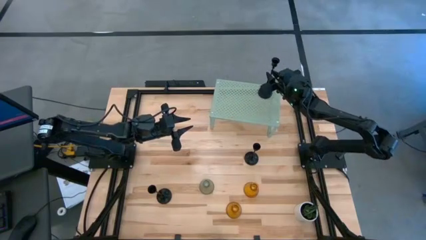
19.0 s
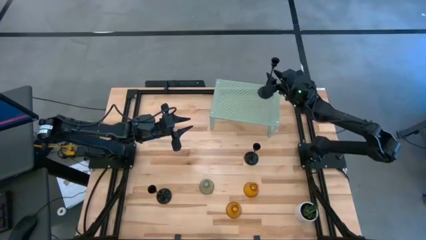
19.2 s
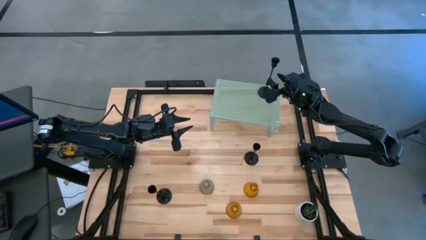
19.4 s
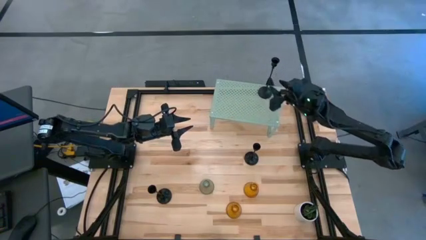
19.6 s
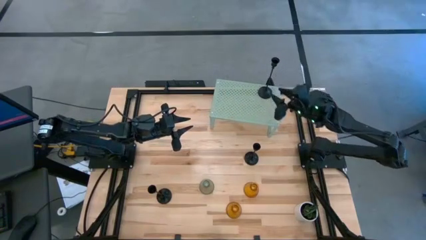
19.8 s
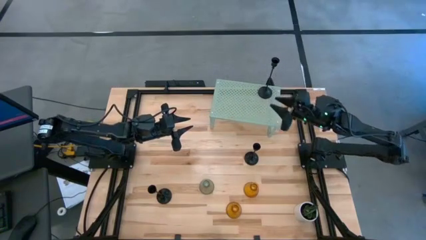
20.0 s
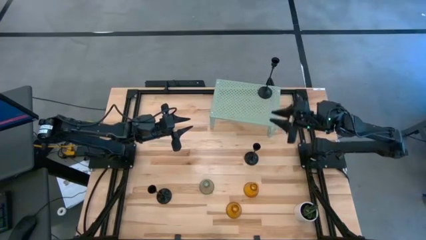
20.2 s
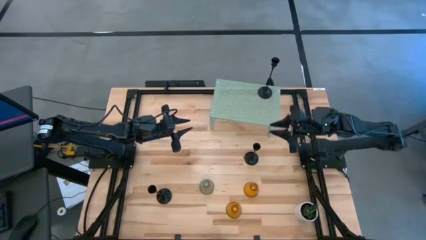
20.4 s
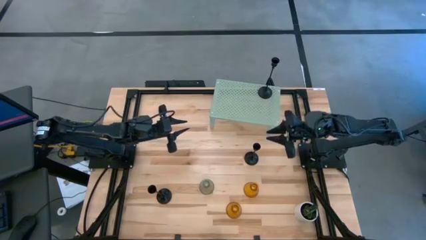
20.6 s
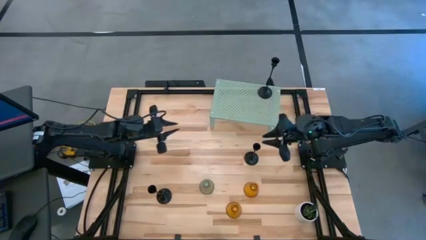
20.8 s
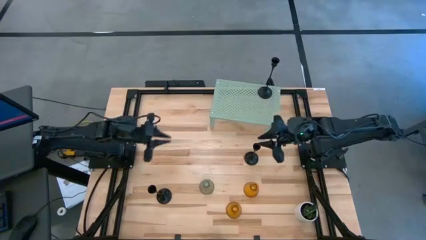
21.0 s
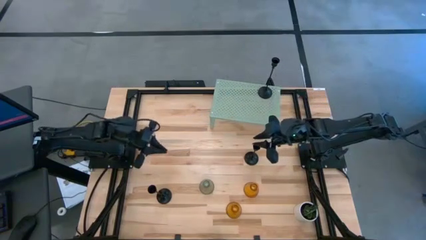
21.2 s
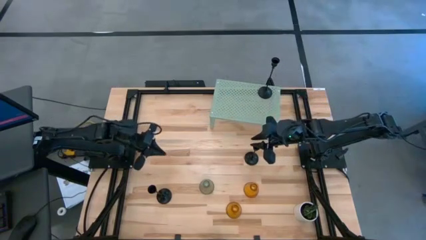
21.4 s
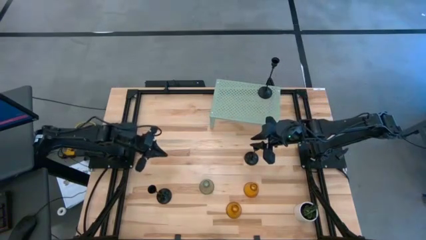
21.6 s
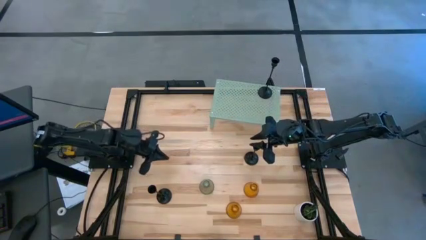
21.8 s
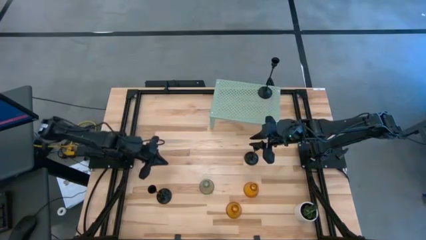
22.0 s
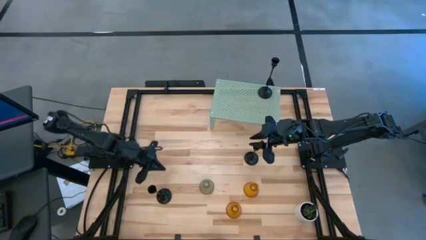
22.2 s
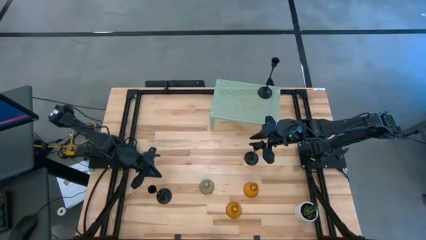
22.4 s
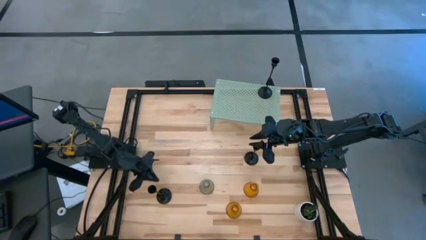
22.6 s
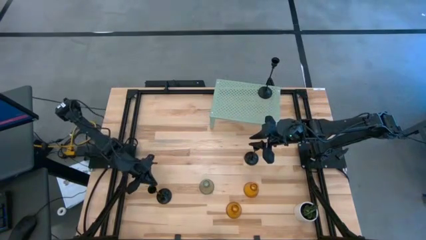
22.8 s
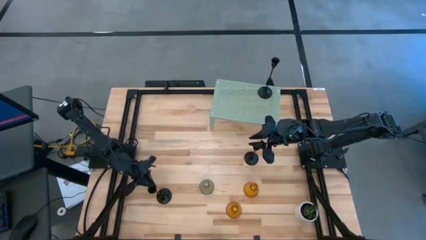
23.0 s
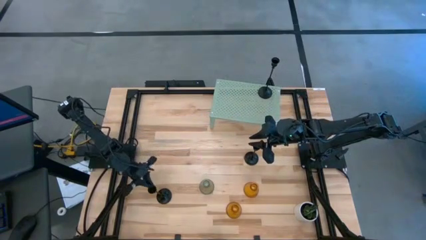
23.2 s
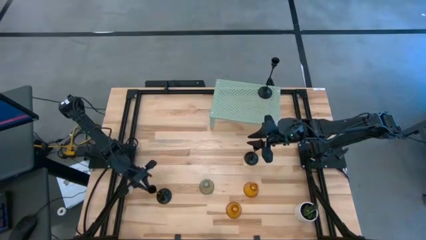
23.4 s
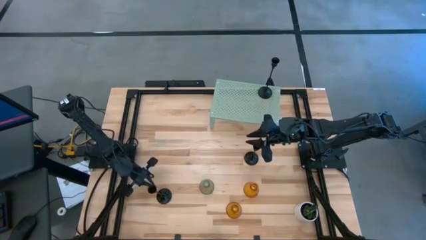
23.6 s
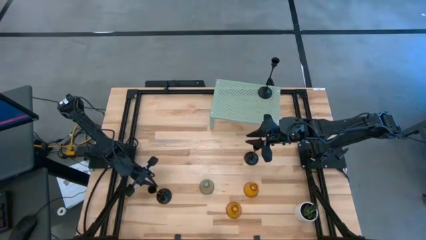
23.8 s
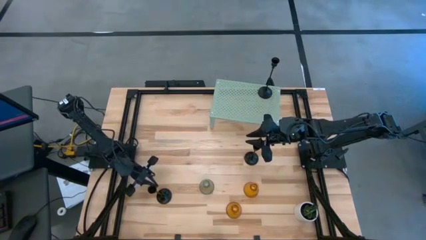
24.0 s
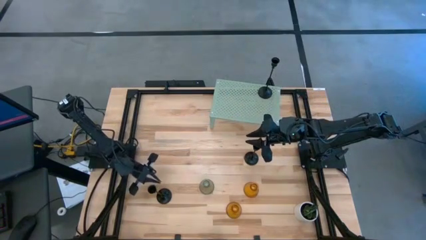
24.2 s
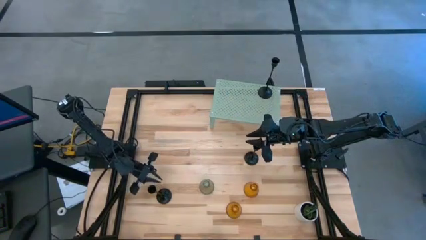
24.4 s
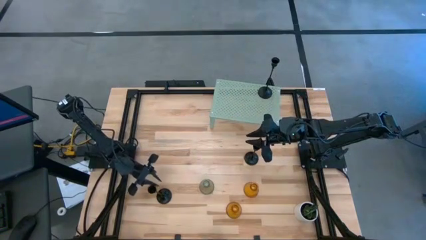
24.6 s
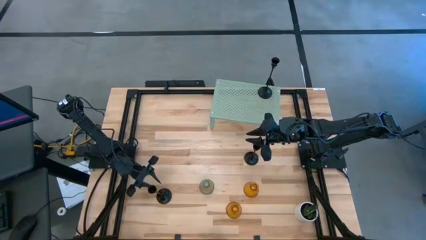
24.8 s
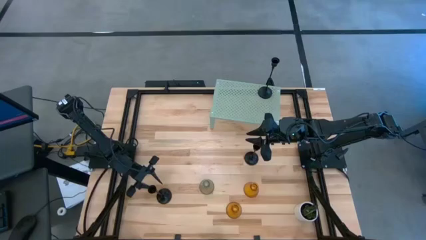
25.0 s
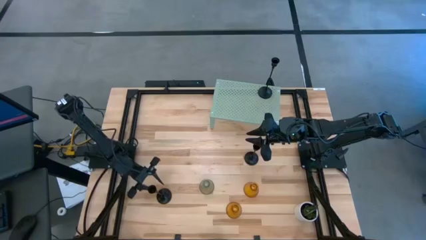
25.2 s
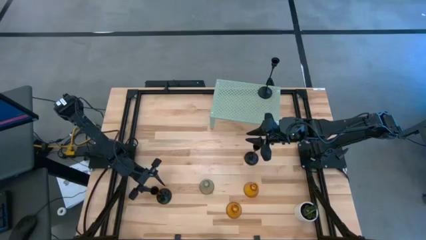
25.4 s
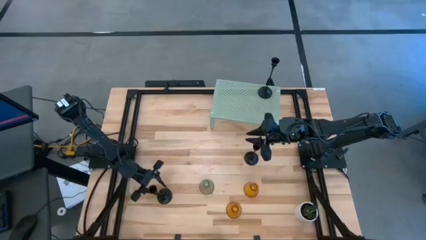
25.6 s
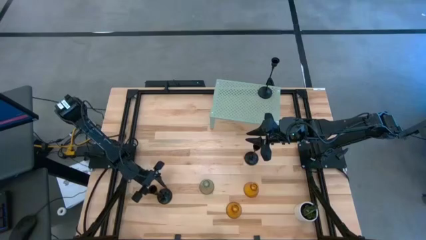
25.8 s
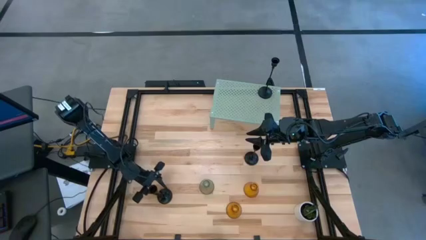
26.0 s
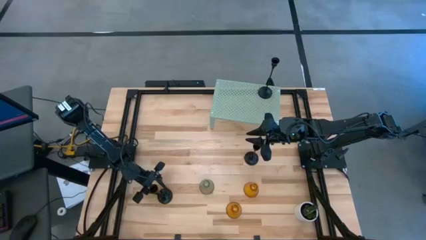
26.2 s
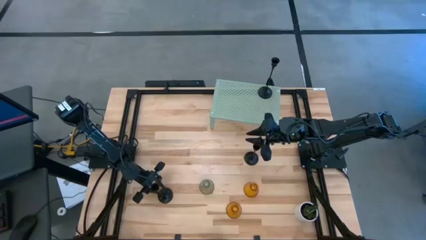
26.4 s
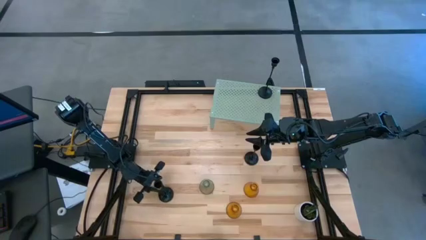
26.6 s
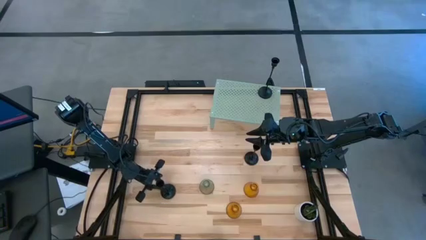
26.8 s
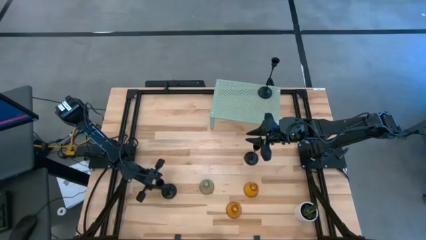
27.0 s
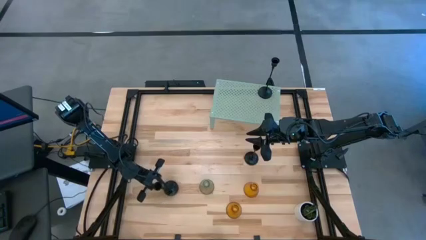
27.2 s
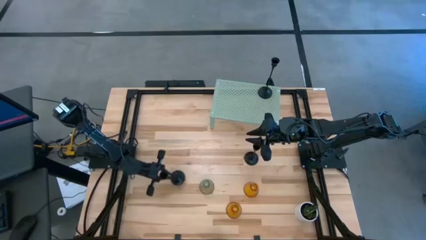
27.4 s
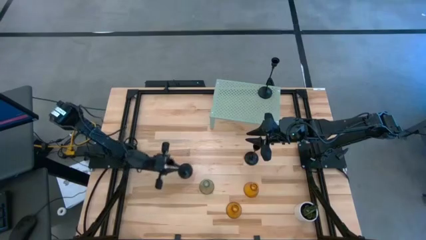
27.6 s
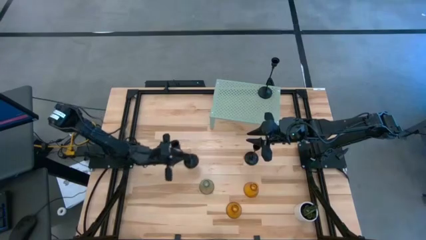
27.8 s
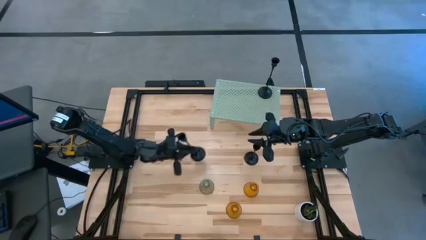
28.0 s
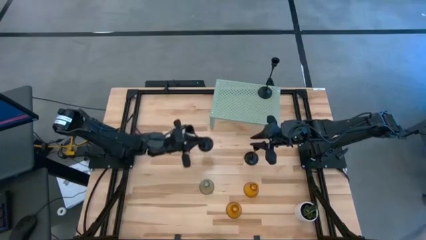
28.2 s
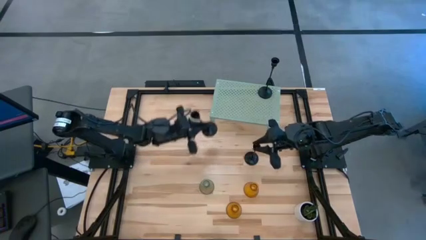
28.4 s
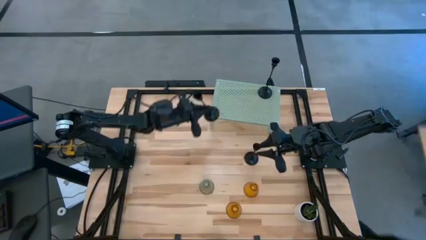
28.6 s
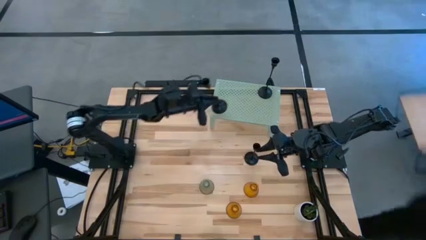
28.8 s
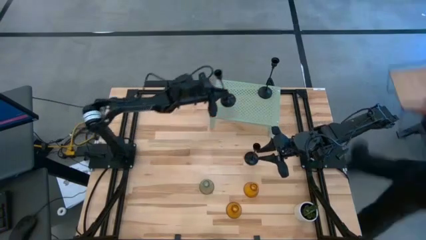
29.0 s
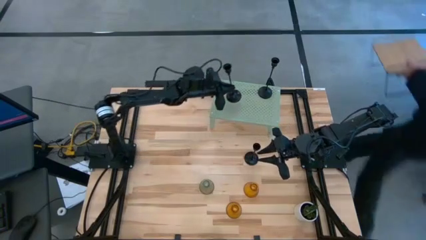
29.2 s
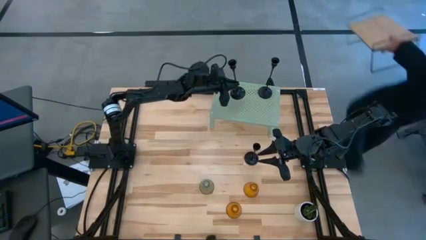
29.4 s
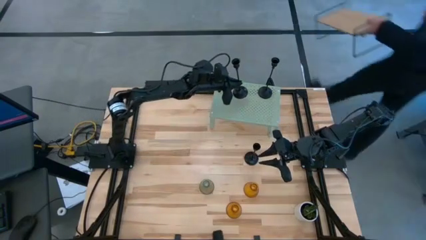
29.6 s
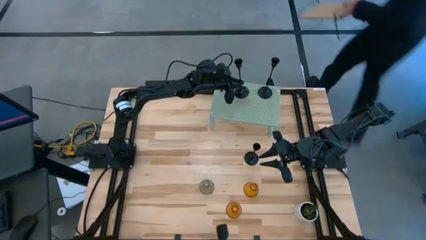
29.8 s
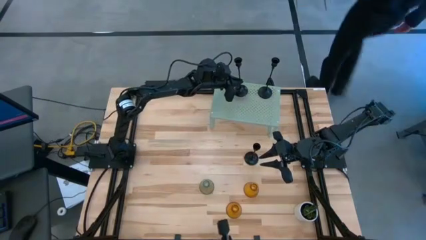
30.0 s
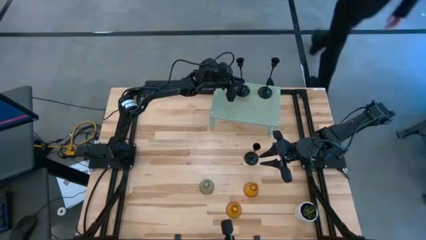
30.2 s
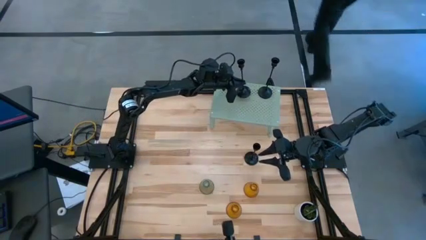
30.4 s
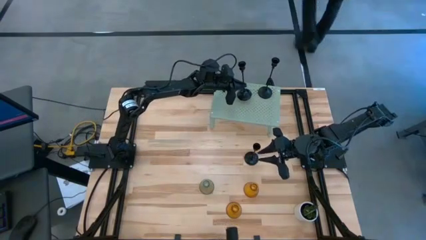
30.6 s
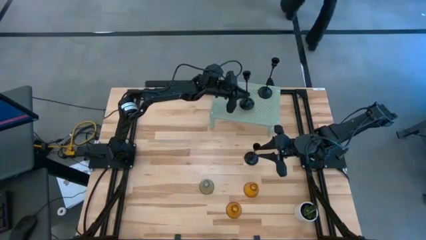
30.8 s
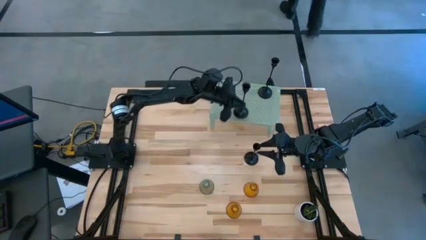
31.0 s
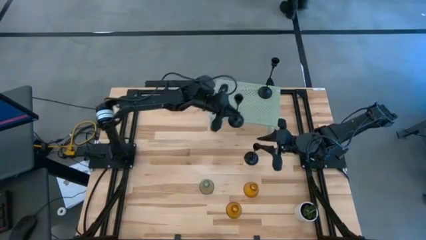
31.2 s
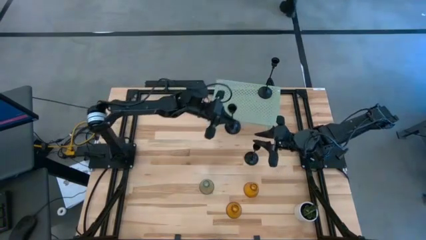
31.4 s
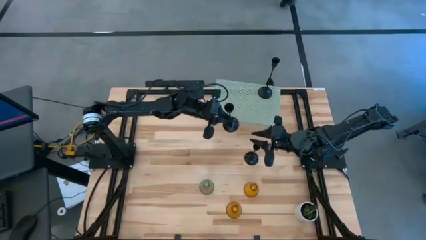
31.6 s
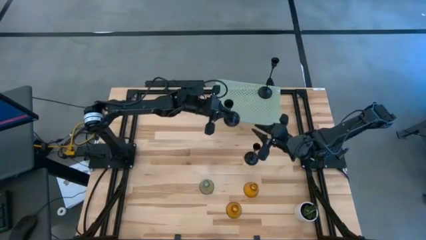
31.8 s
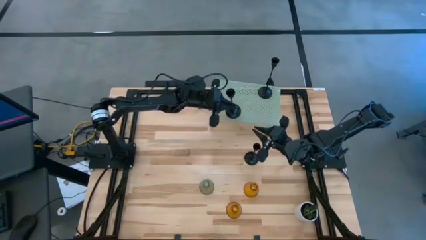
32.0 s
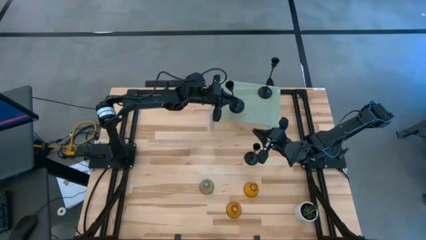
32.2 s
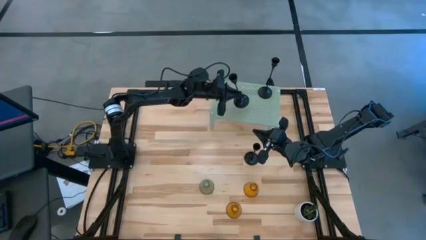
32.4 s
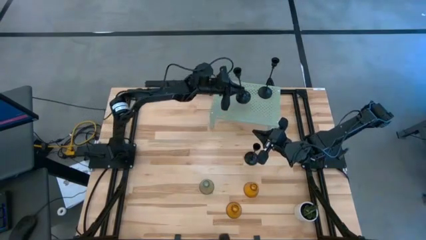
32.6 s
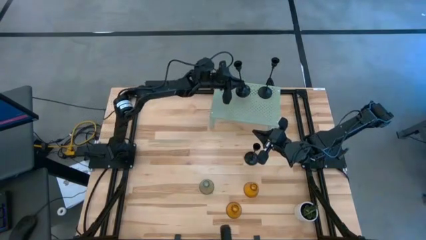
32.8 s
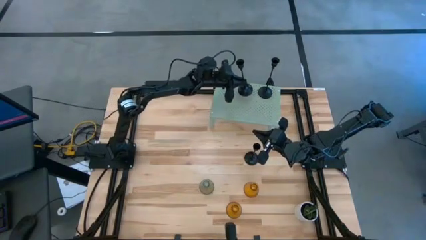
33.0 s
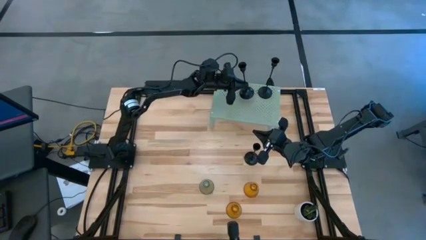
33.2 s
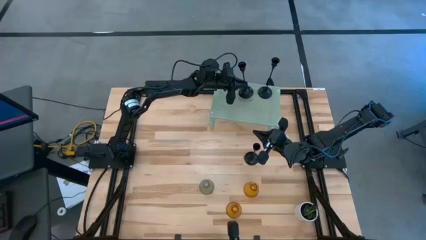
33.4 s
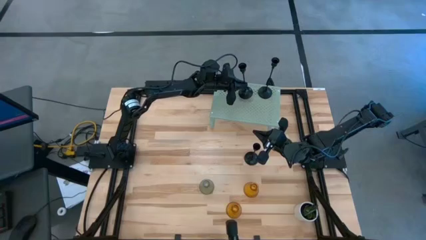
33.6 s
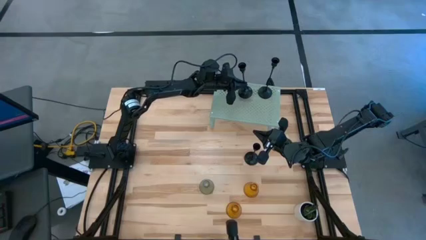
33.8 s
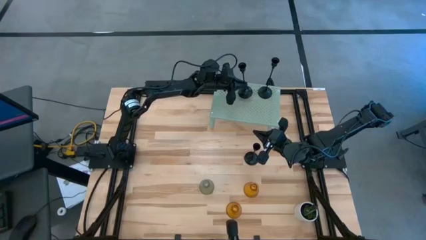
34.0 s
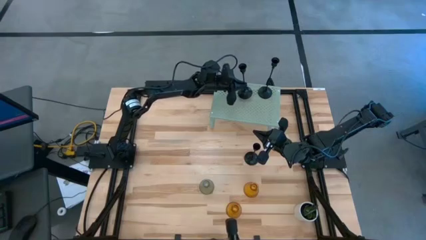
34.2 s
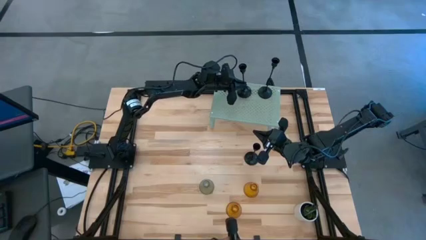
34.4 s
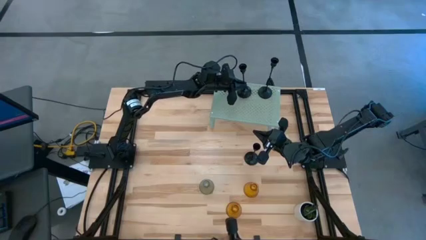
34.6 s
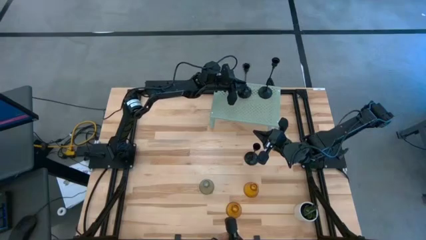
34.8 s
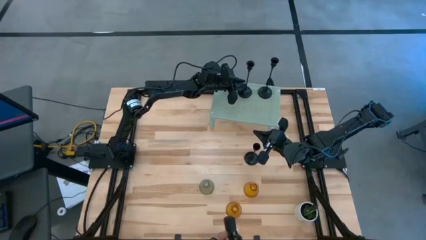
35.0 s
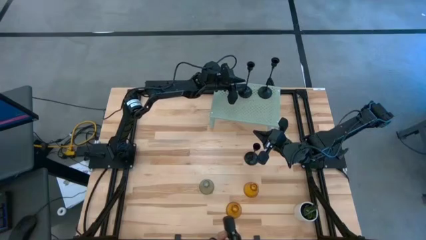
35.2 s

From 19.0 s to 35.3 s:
Task: Pick & Place candle stick holders
Put the bottom black candle holder on the shelf
